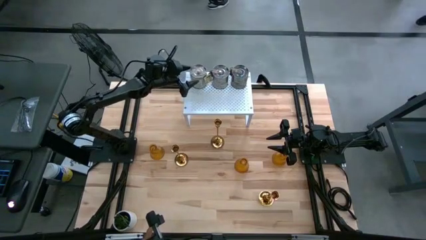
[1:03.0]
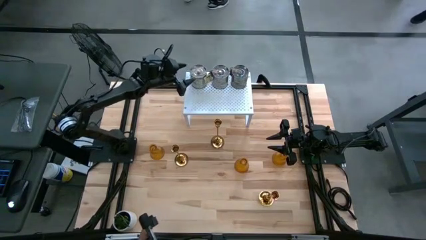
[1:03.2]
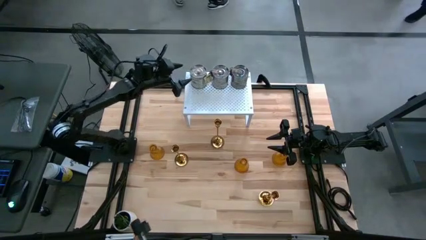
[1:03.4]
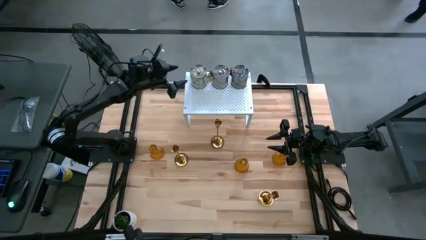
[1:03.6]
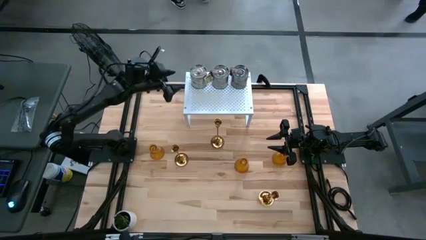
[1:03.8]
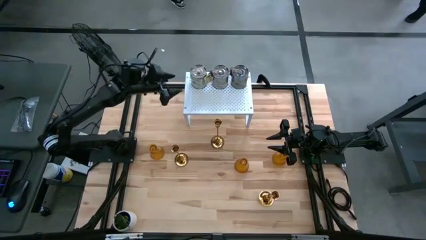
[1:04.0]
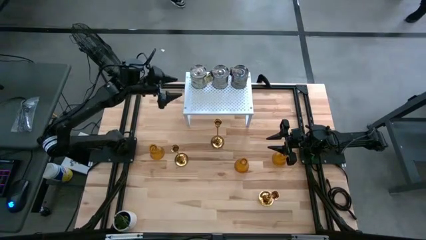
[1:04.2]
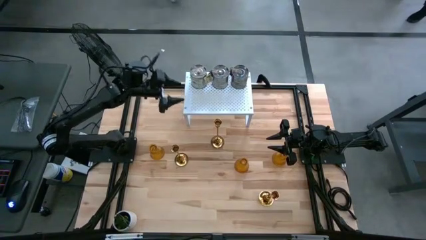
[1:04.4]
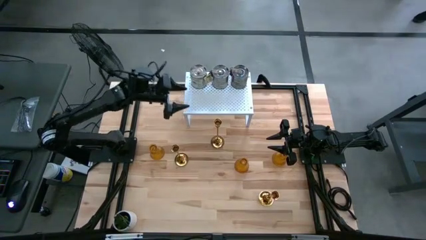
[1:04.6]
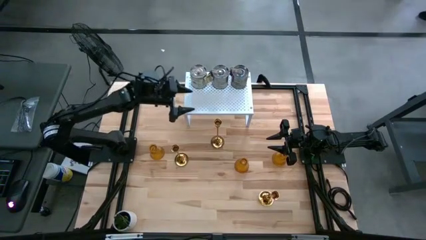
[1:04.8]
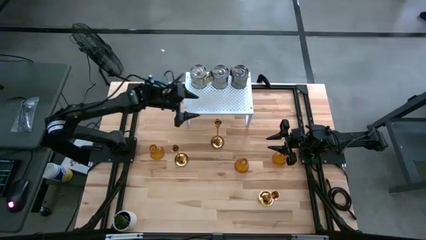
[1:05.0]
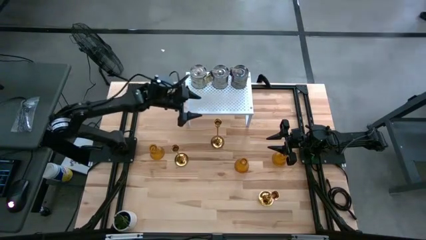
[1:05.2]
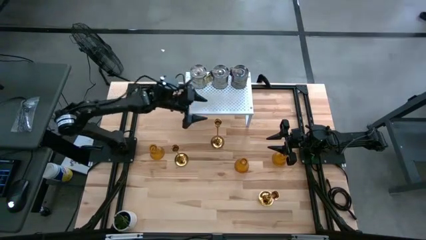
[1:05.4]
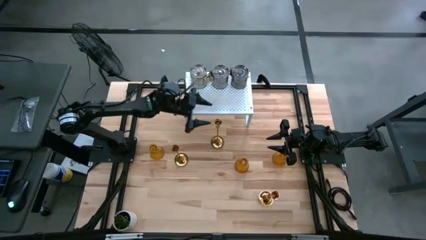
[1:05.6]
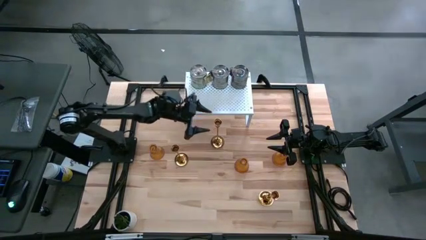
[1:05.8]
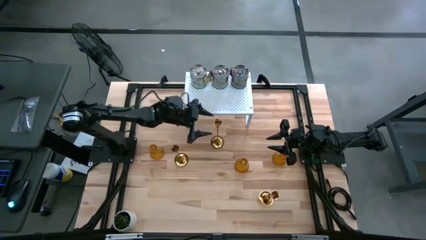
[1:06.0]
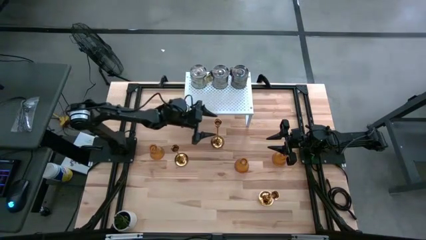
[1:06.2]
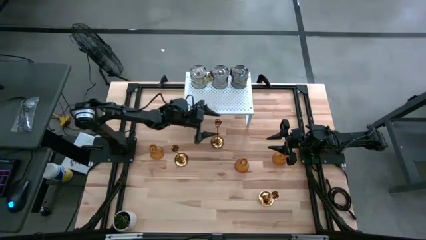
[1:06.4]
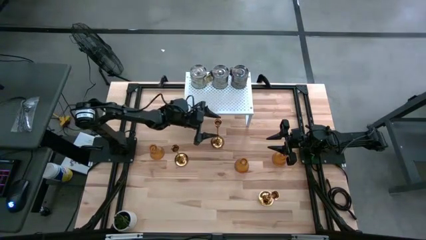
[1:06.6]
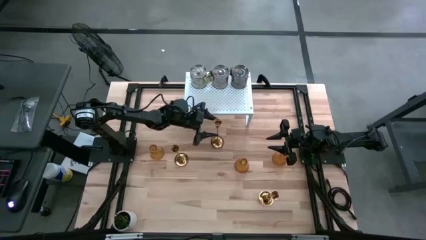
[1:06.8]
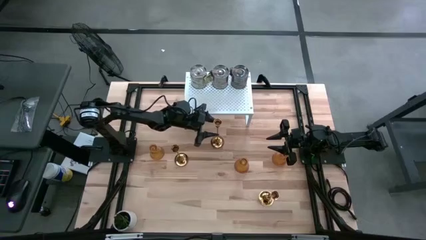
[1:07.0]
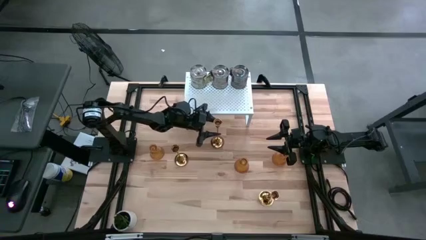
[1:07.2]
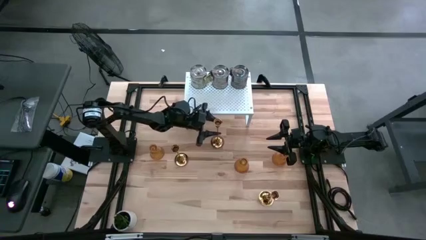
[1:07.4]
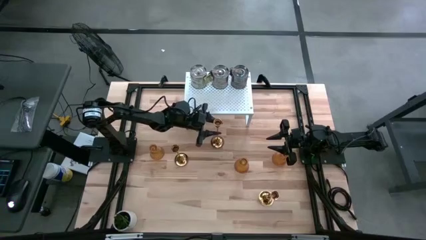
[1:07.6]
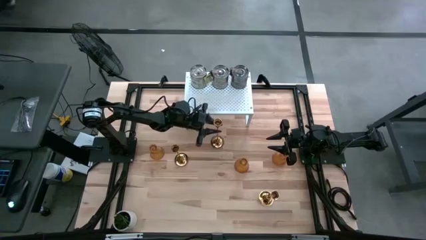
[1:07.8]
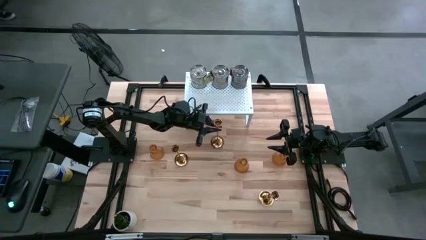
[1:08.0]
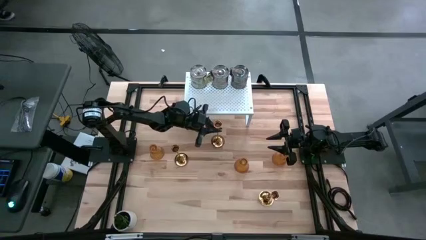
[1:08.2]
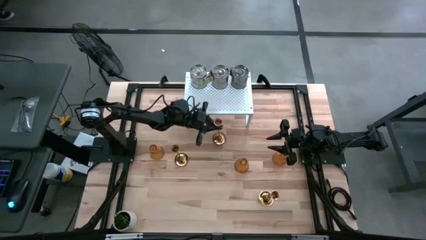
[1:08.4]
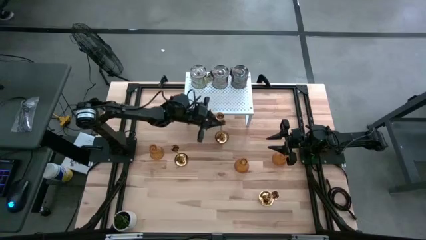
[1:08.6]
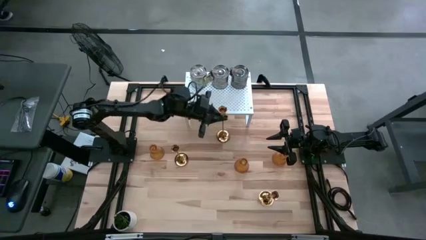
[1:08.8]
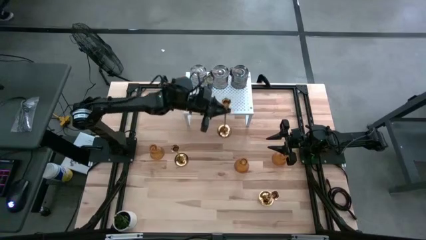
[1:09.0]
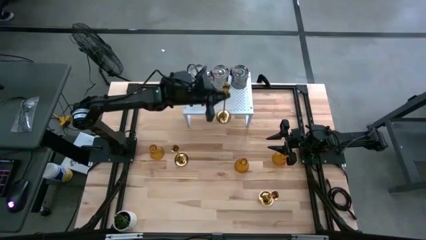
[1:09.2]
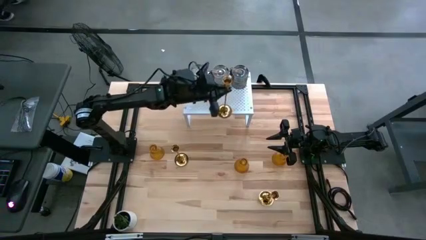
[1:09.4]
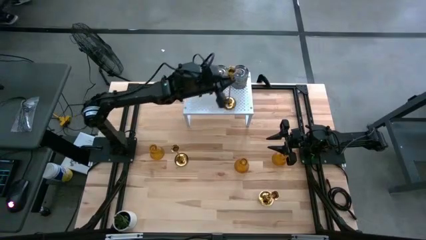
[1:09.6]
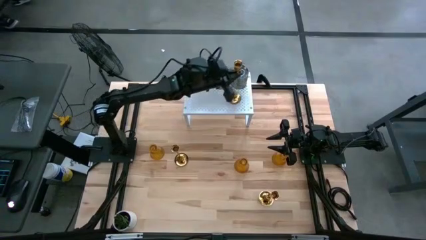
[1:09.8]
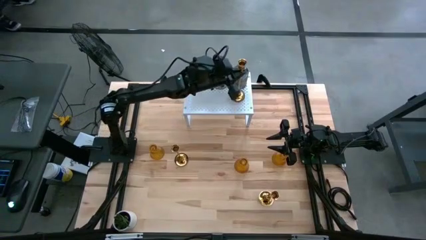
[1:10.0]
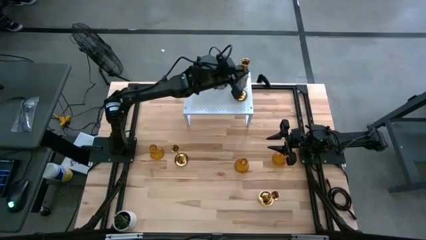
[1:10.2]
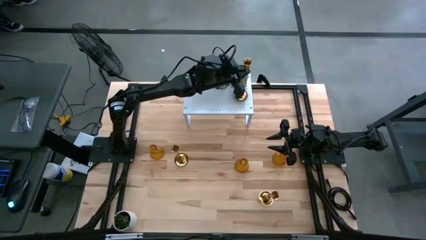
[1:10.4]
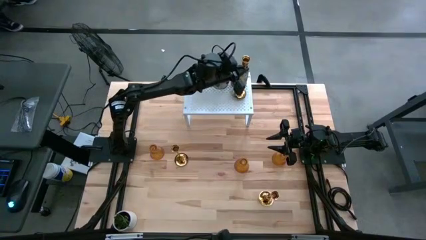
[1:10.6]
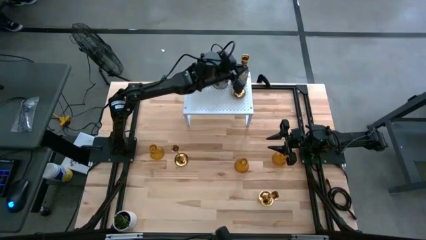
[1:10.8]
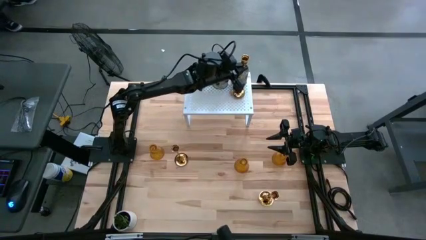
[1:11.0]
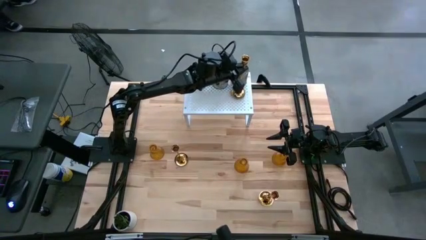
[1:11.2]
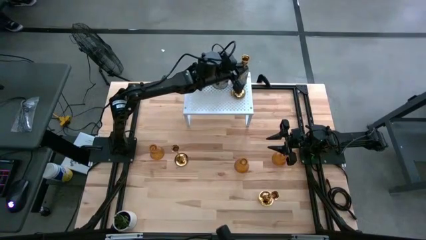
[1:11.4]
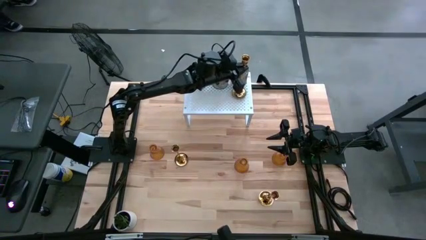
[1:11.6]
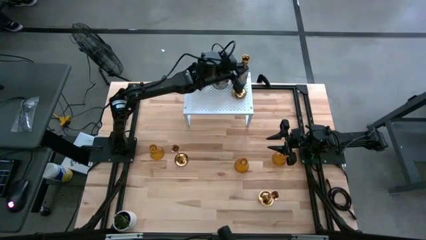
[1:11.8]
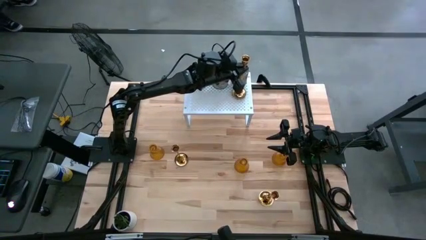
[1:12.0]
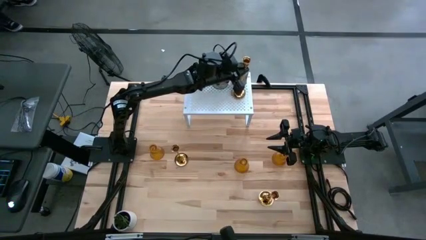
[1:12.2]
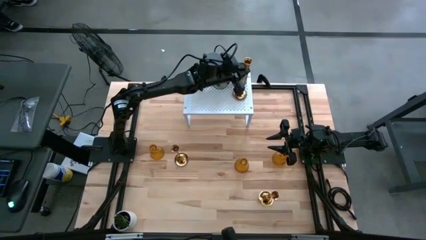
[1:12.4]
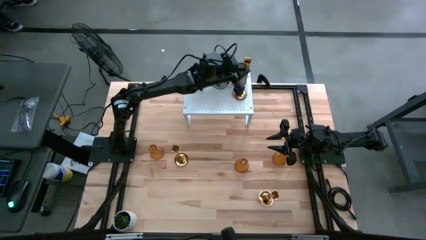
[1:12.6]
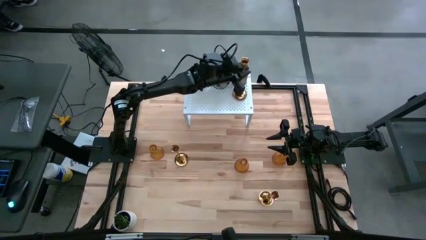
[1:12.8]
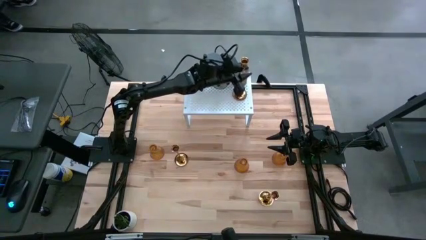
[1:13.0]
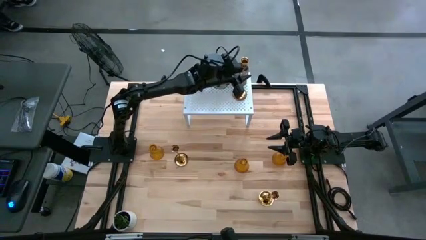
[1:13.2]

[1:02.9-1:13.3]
Task: Pick & Place candle stick holders
Put the top gold candle holder on the shelf

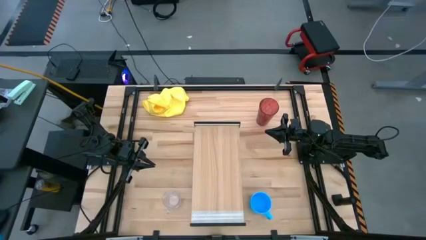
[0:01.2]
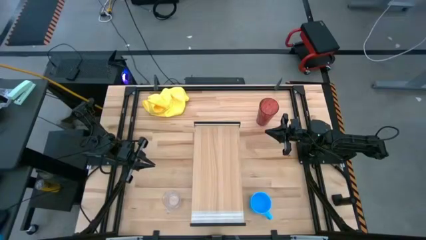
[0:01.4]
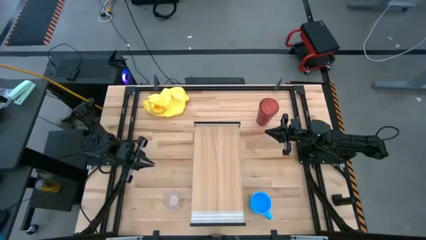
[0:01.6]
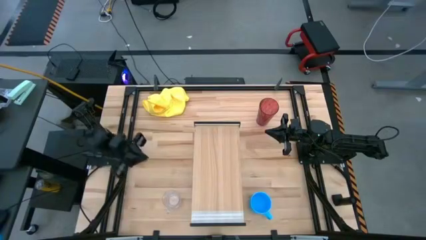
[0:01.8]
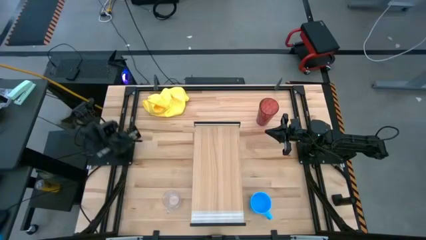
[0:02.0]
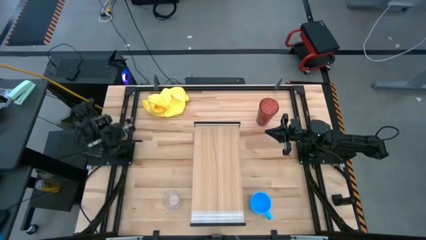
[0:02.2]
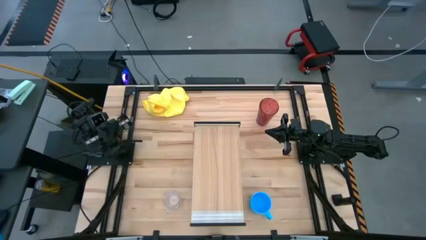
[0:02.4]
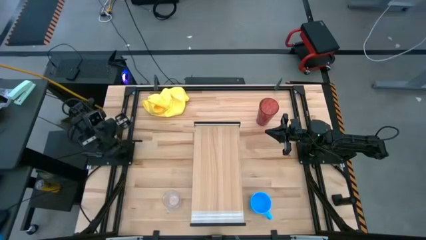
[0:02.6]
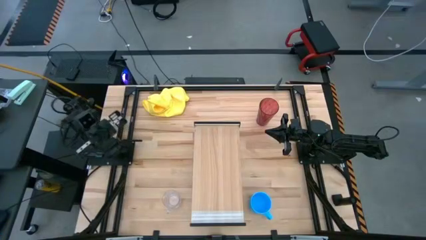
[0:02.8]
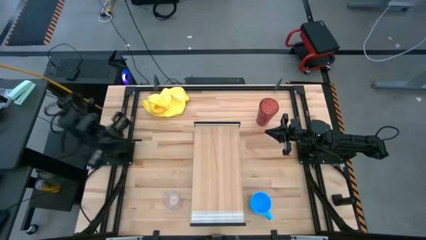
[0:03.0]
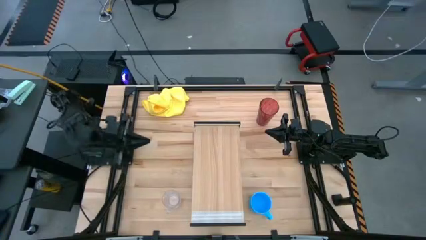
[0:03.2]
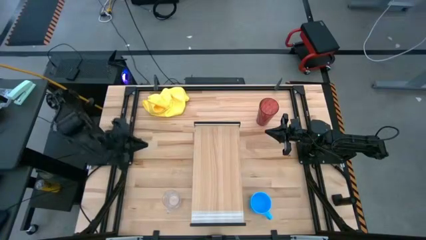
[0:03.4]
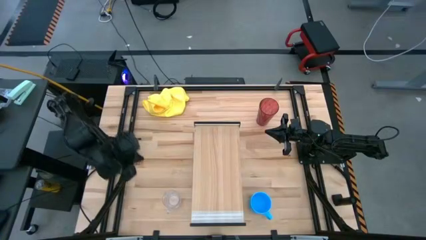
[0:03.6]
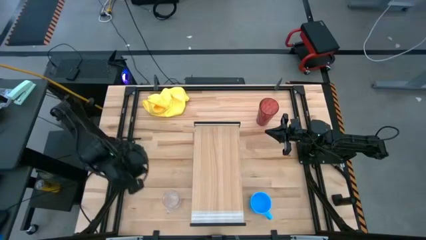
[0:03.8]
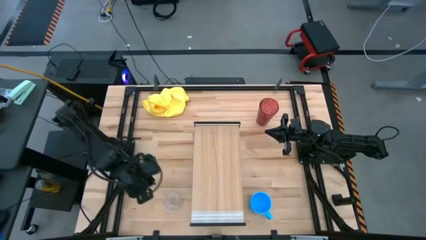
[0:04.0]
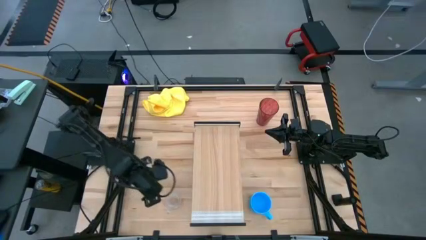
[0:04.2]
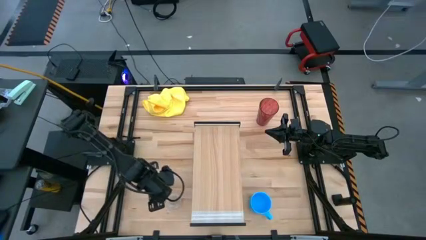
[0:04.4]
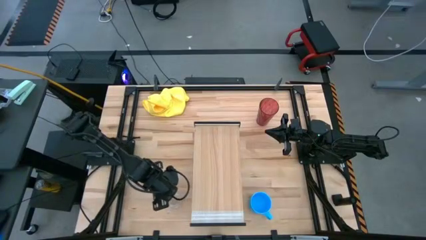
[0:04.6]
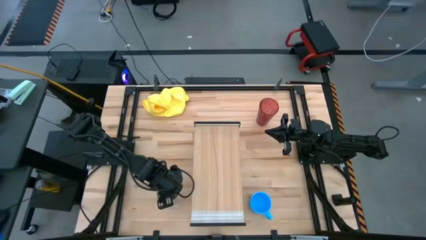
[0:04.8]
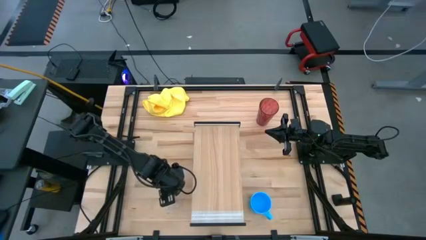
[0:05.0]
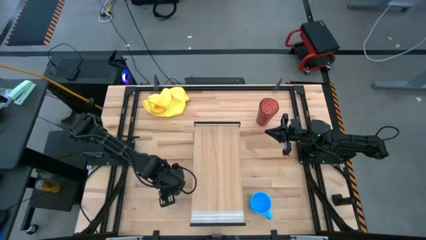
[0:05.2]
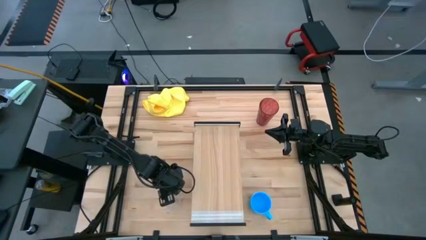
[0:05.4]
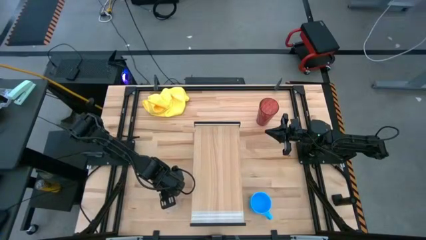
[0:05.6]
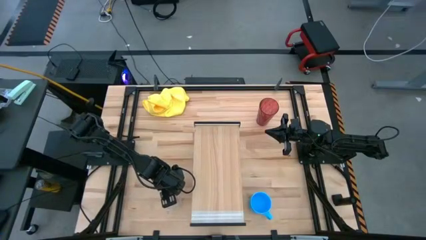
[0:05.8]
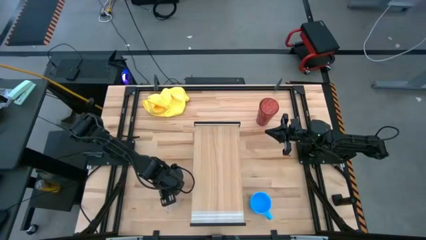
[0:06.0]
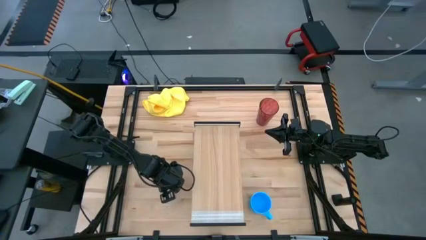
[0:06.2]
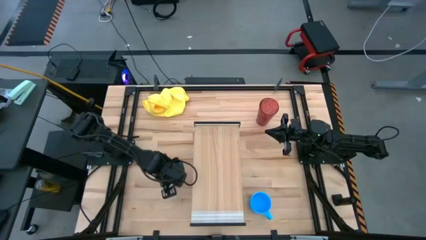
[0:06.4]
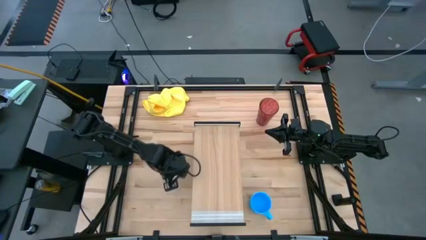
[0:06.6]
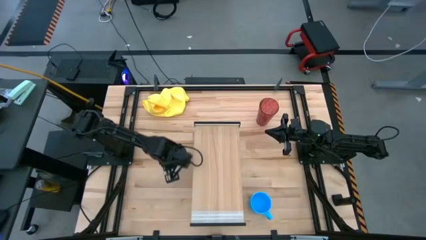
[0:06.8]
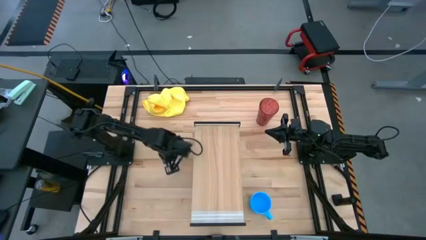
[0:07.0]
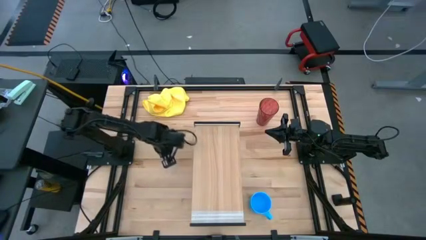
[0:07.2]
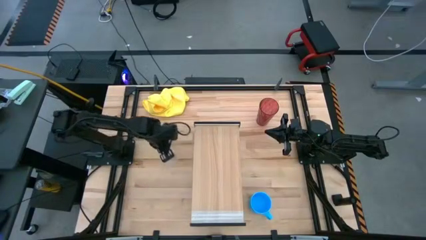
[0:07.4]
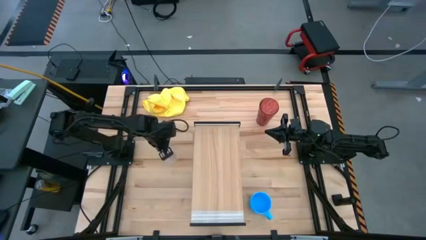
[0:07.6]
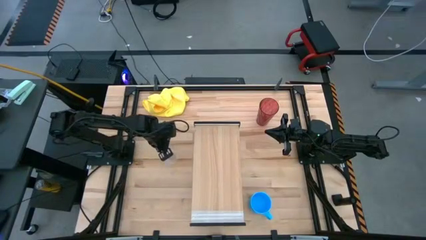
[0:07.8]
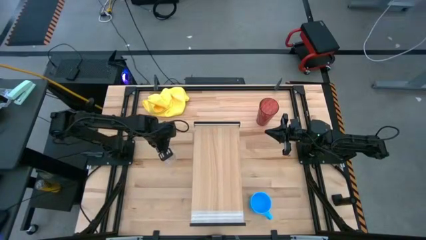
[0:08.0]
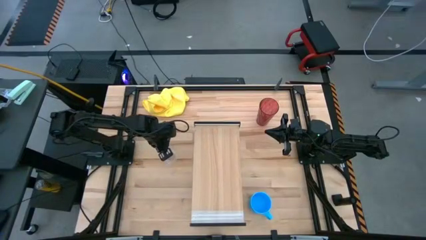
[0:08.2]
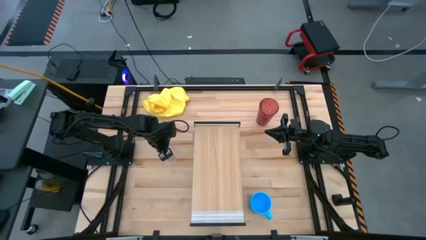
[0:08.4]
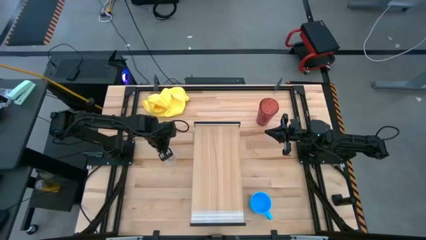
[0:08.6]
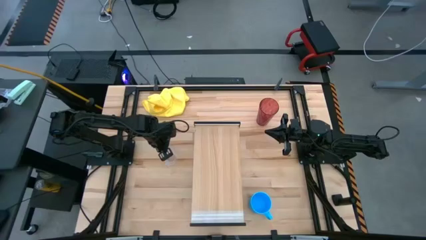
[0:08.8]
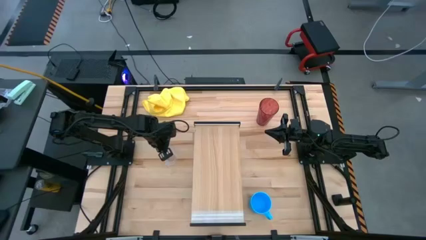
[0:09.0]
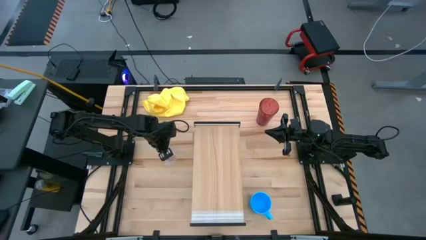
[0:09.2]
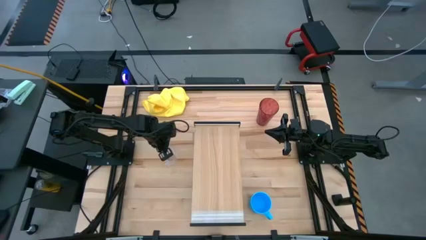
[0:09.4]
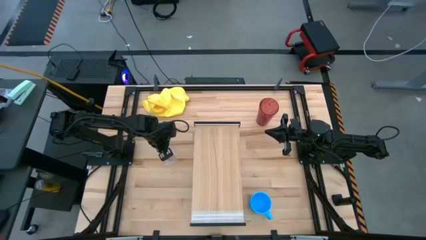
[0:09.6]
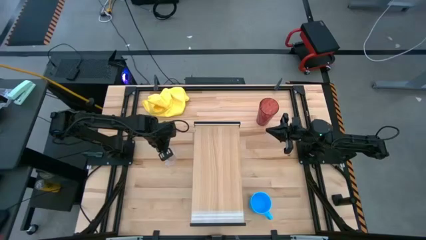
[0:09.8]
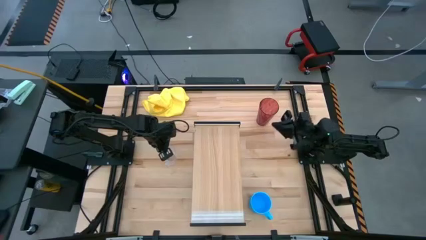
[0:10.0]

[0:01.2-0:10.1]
Task: Stack small to large cups/mugs on shelf
Move the transparent cup to the middle left of the table
